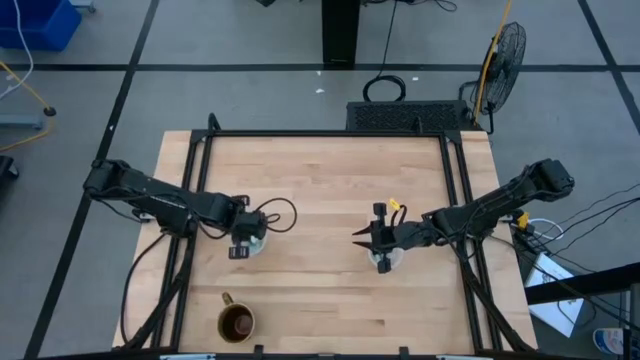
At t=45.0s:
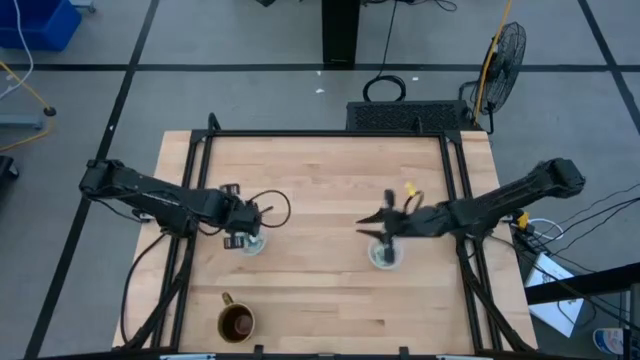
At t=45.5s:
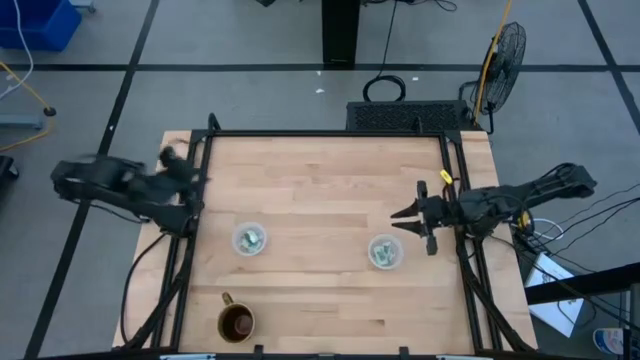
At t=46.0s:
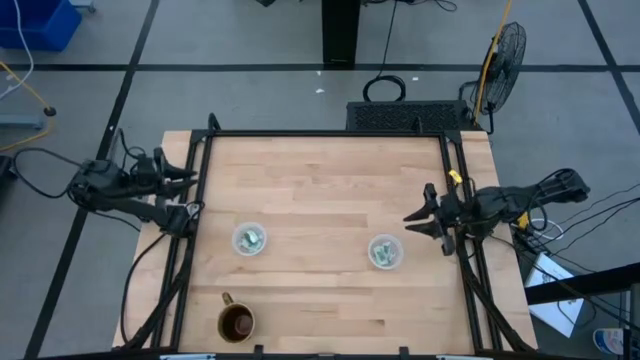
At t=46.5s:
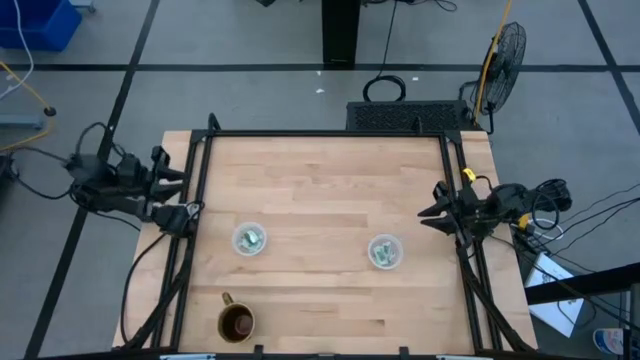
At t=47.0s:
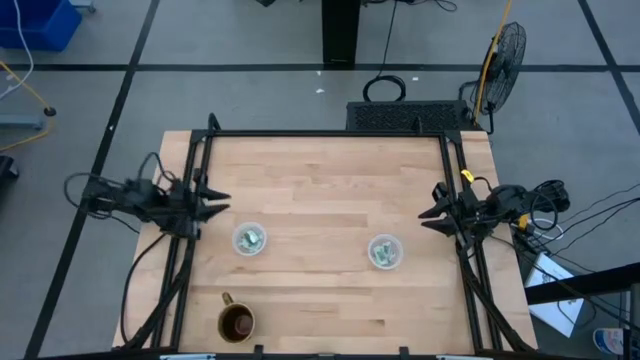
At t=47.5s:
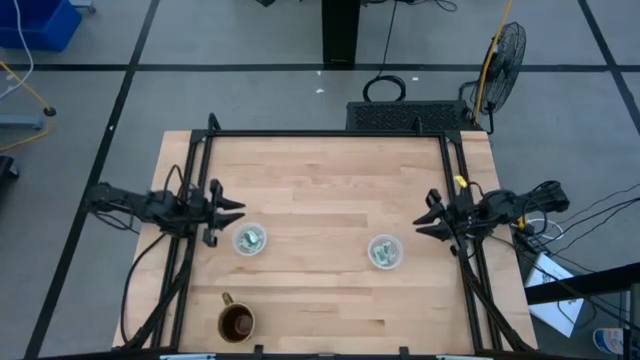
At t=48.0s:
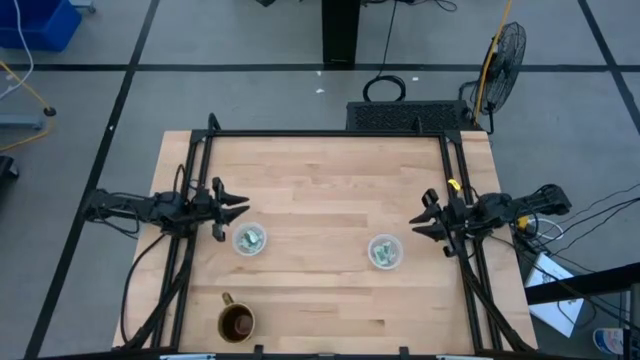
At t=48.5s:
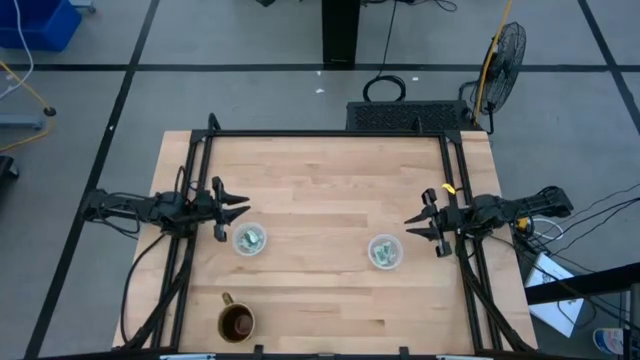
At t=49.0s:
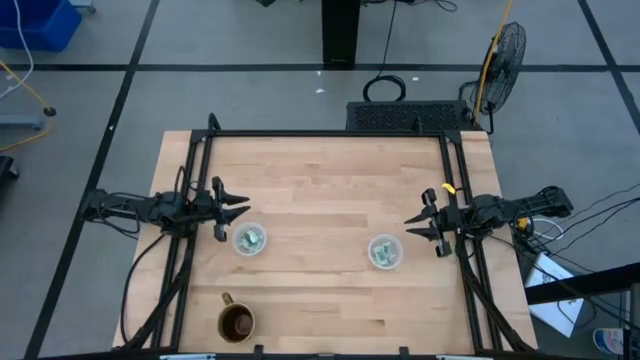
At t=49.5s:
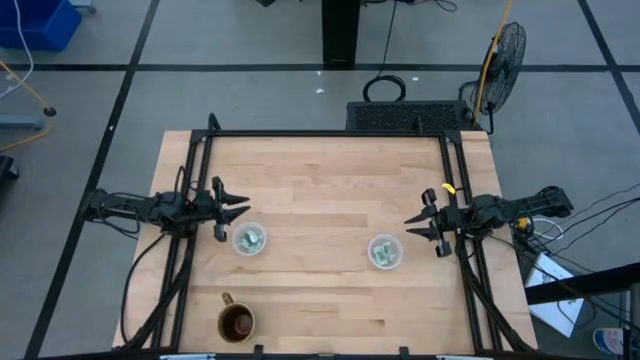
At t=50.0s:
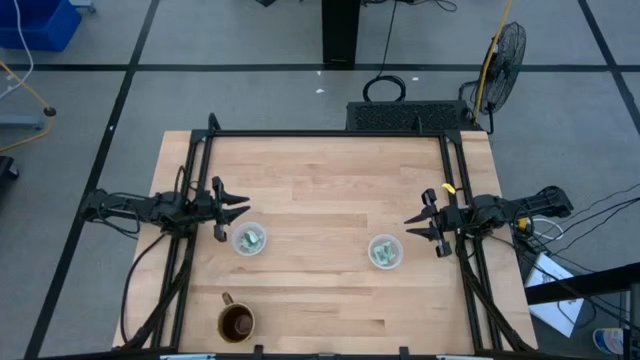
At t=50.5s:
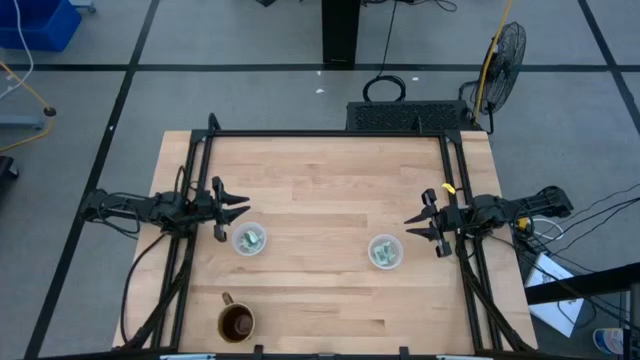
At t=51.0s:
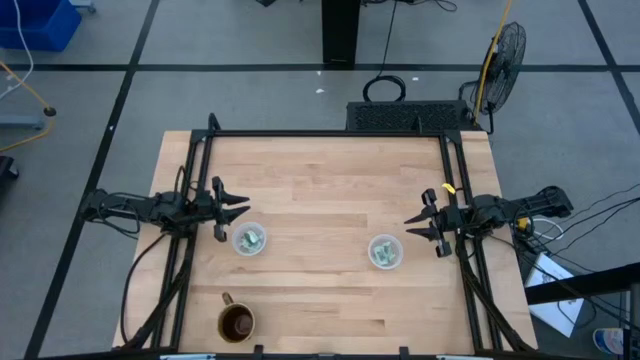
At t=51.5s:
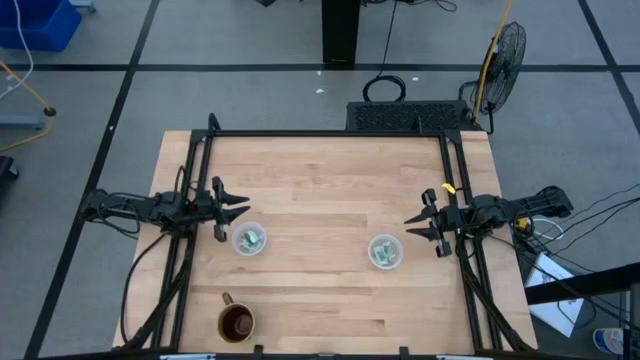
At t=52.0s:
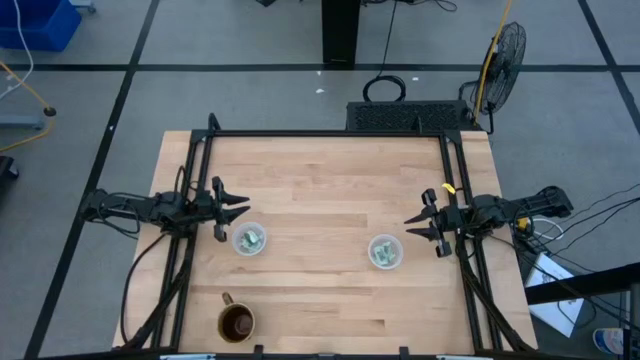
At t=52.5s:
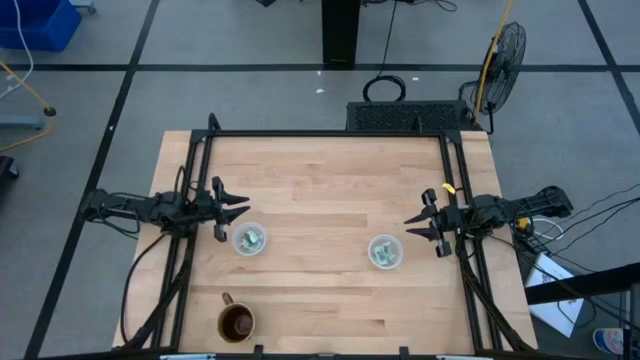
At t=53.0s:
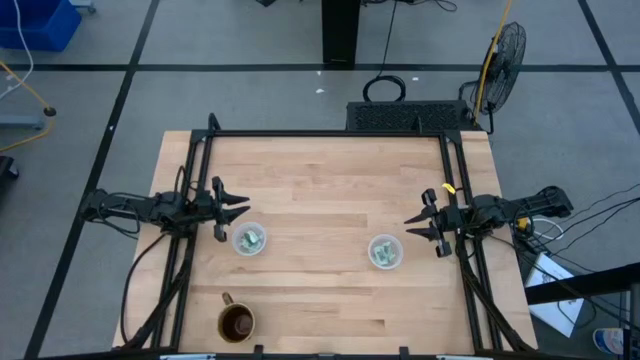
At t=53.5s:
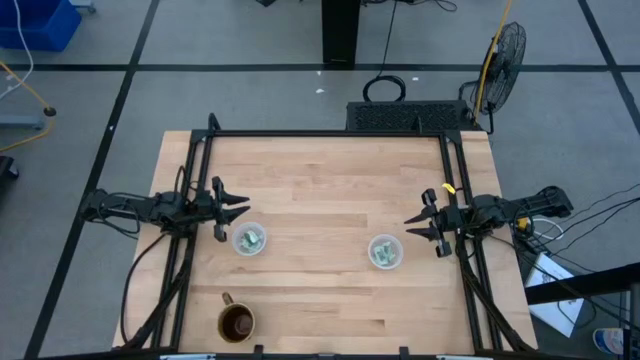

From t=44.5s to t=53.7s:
Task: Pick and place Stevia / Truvia into bins
Return to Home Position

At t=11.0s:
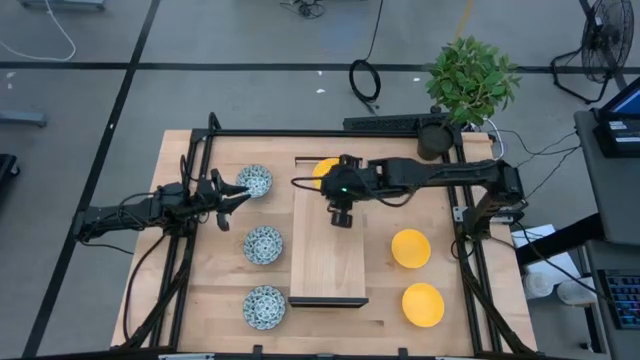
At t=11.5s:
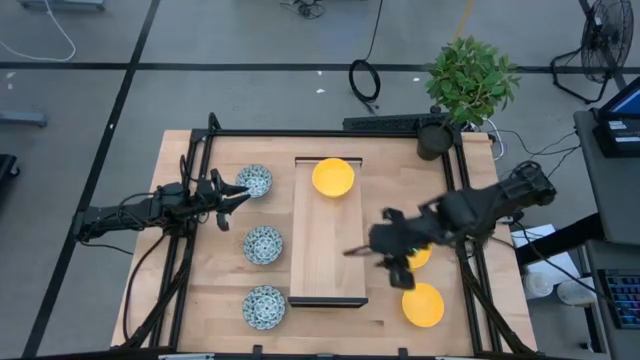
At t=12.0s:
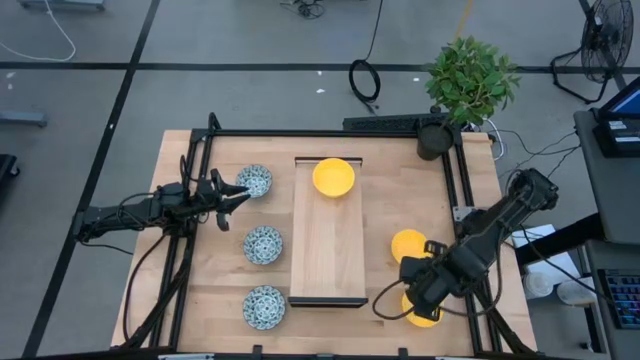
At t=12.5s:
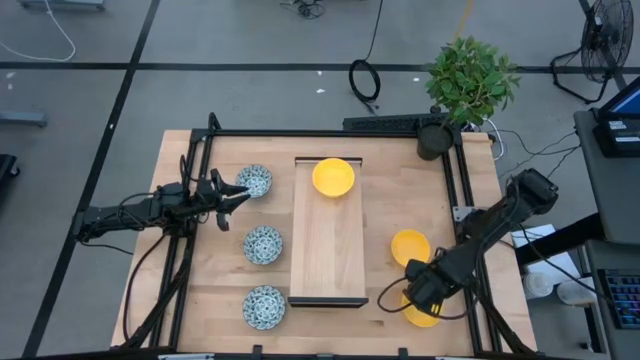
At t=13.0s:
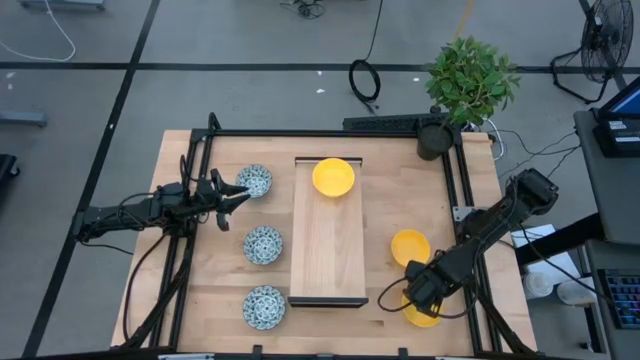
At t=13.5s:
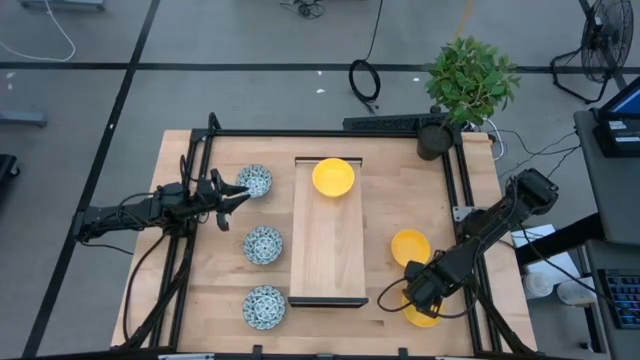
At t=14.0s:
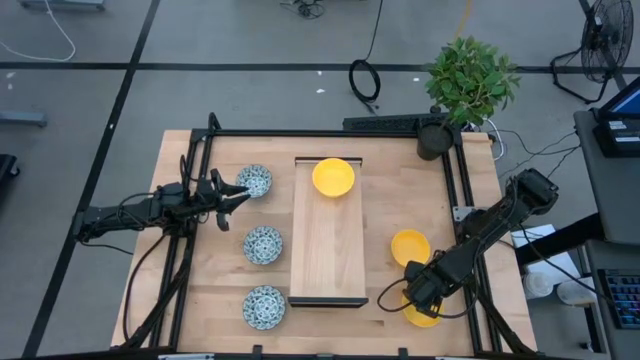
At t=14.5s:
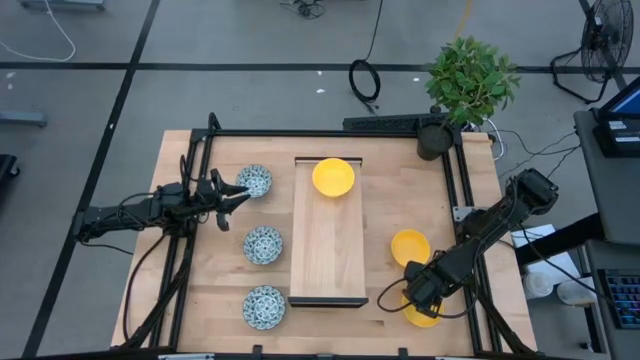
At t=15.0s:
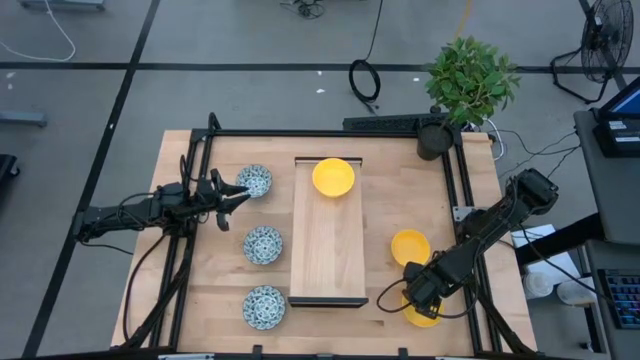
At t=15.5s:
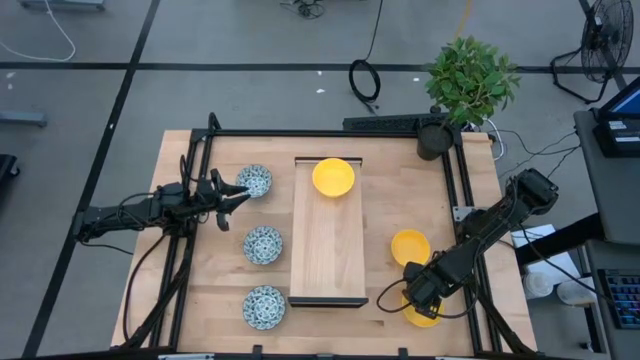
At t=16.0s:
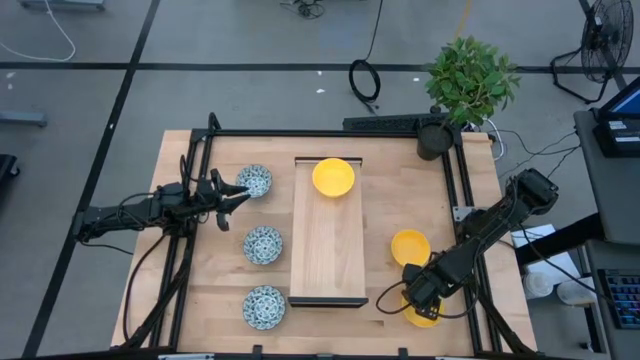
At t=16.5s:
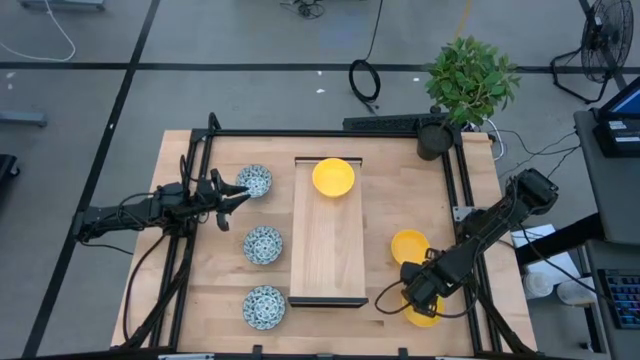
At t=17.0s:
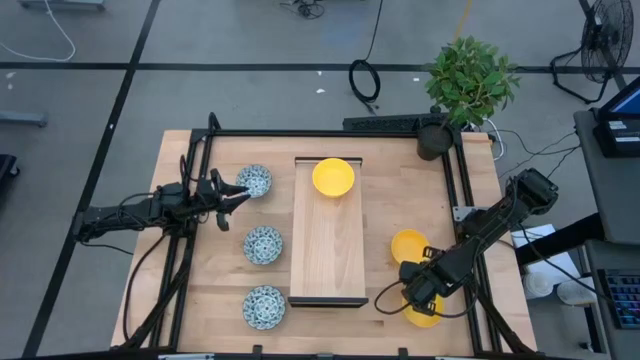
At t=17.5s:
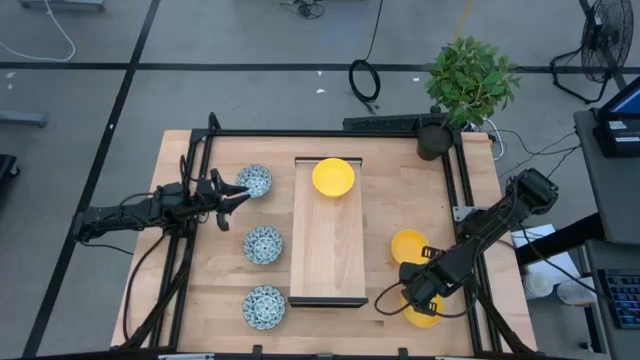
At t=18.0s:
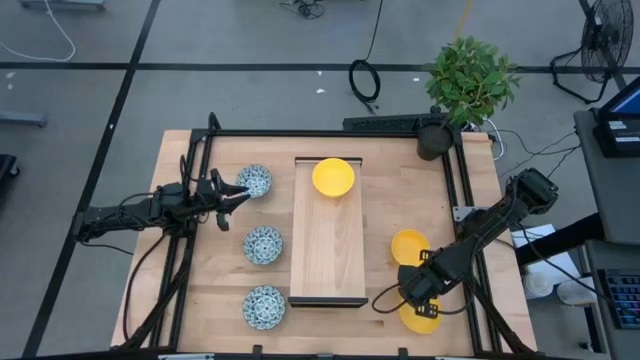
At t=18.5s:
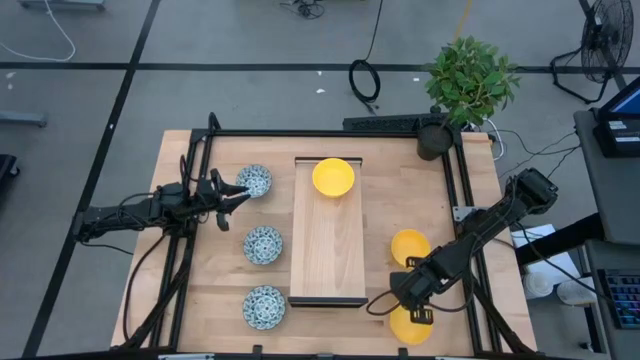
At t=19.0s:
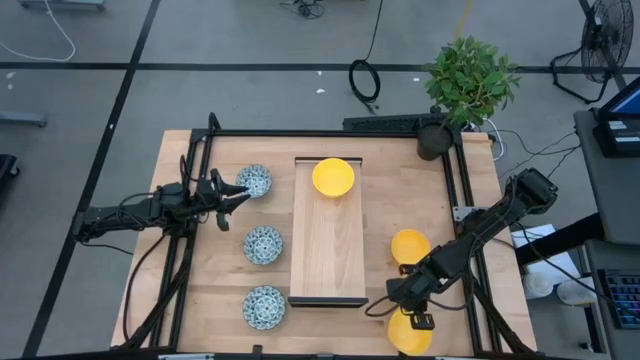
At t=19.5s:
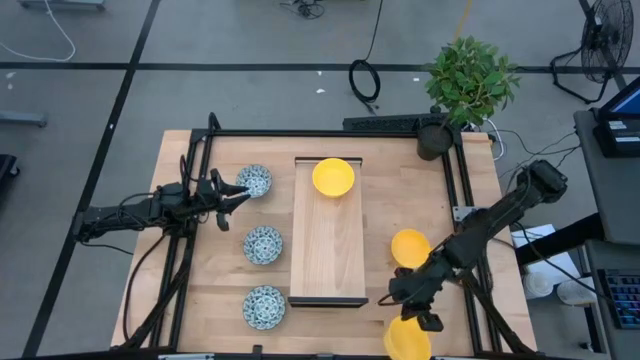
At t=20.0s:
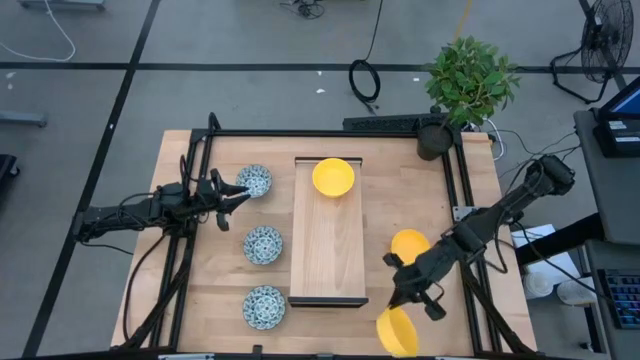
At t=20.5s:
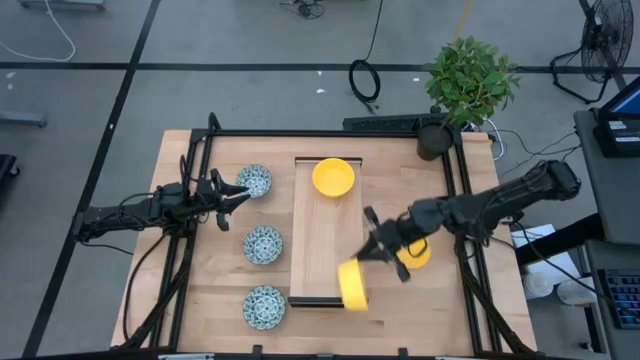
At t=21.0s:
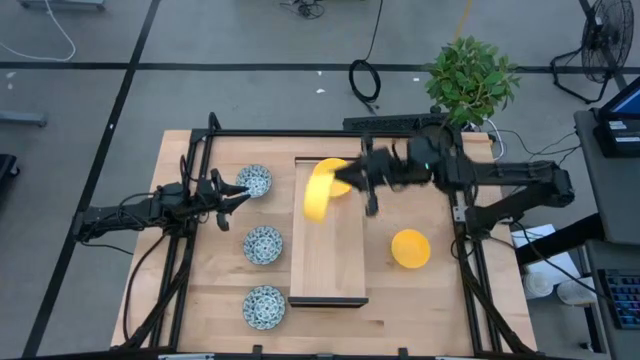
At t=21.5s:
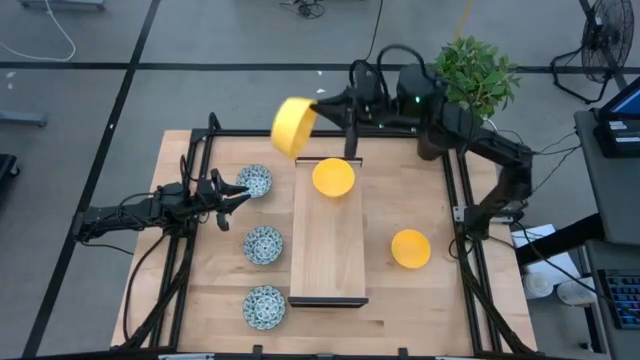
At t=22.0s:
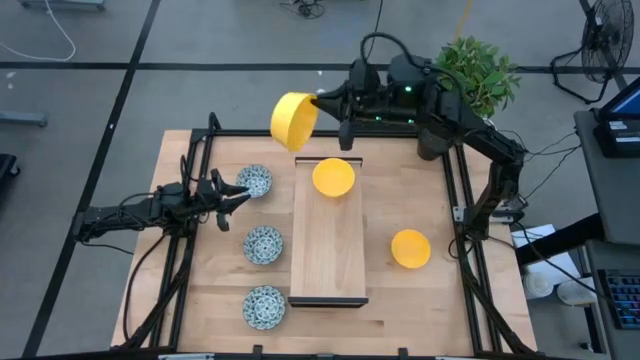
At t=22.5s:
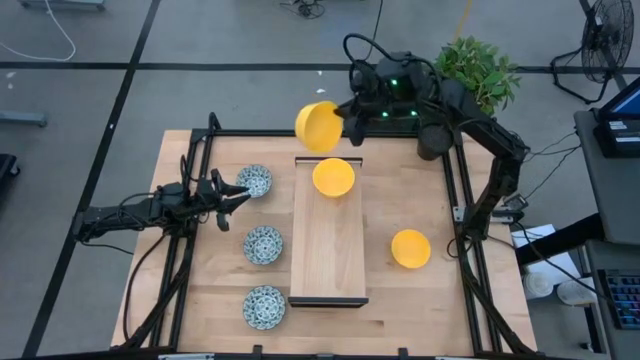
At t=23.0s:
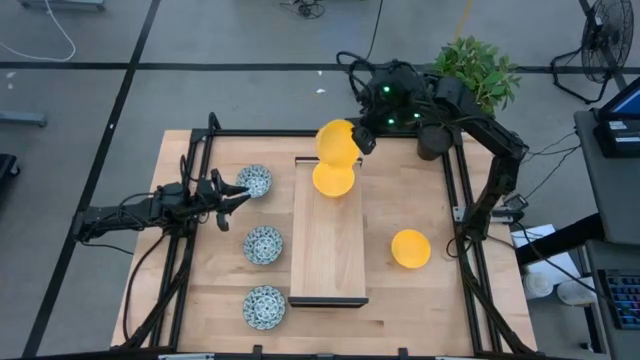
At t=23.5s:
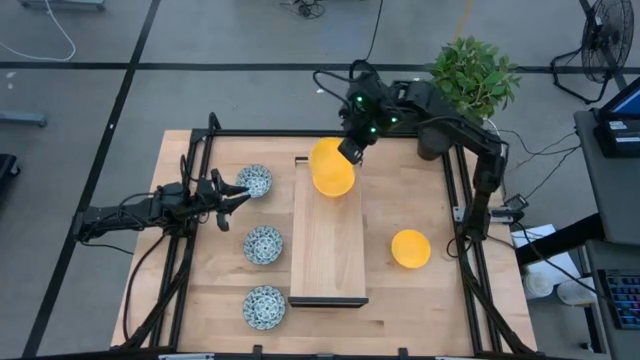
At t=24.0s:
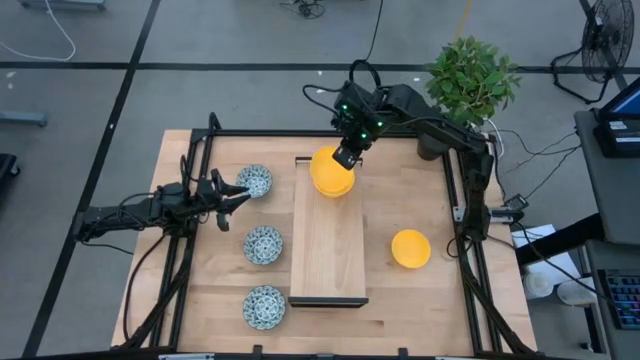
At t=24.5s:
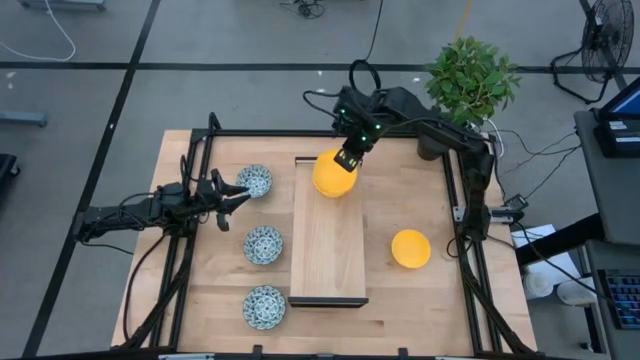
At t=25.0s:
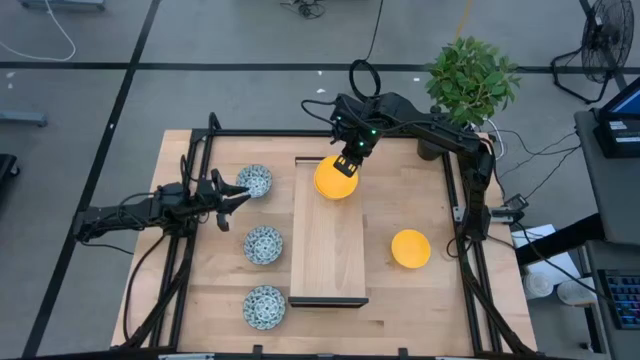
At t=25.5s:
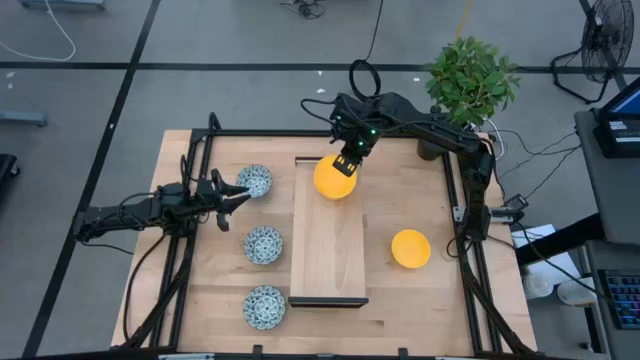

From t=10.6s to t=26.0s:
Task: Pick & Place Mini bowls
Stack the bottom yellow bowl on top of the yellow bowl on the shelf
